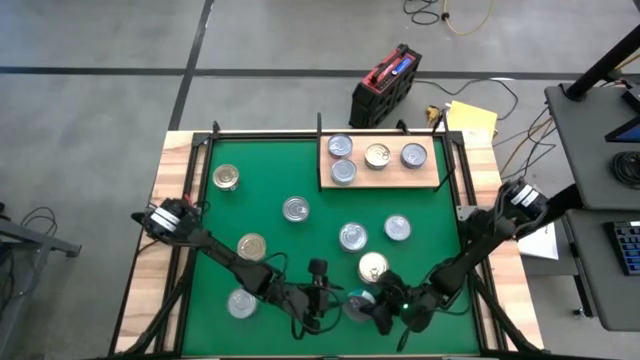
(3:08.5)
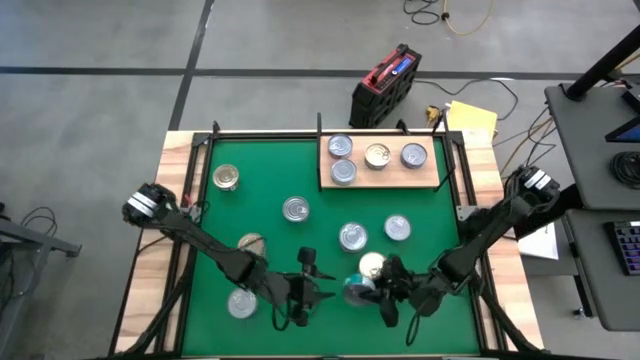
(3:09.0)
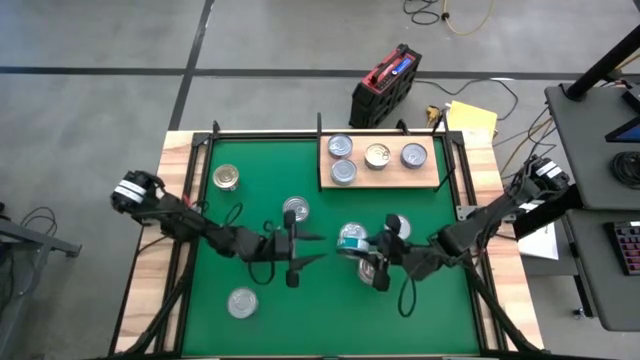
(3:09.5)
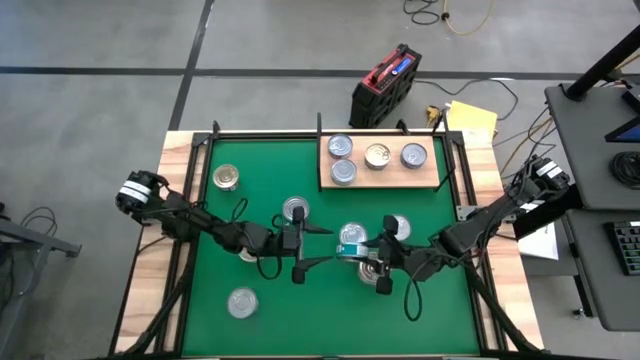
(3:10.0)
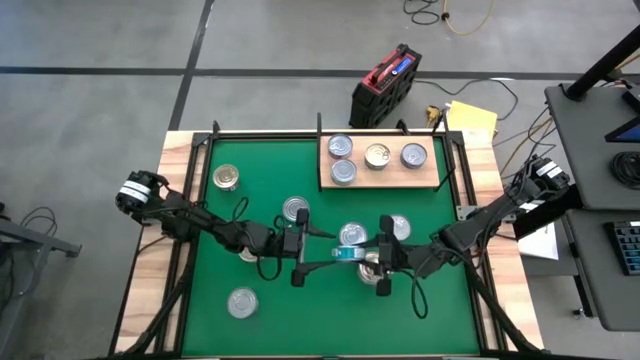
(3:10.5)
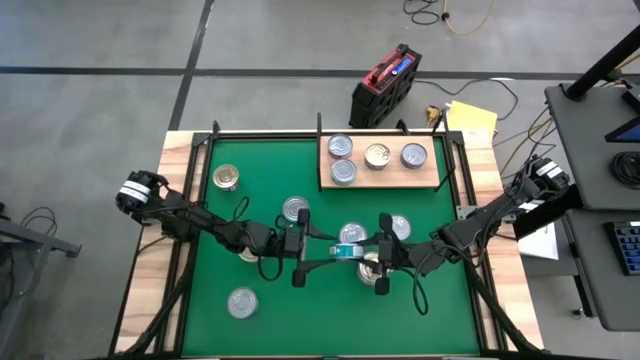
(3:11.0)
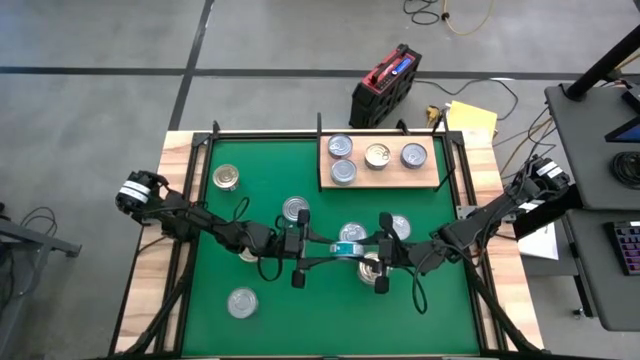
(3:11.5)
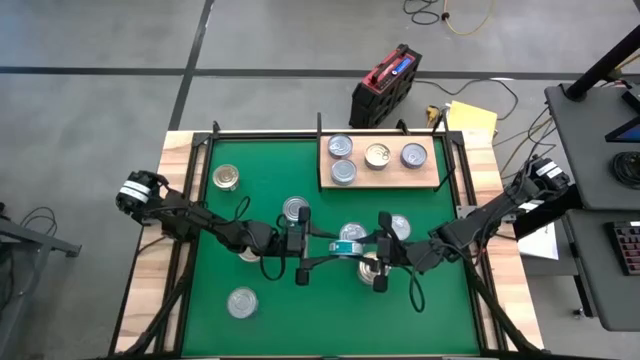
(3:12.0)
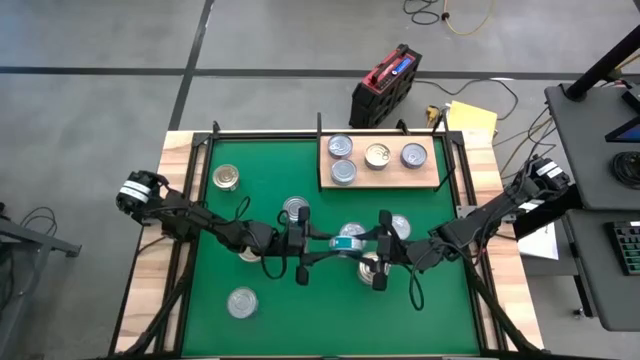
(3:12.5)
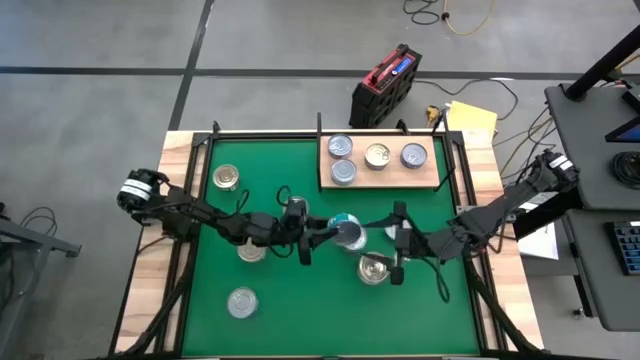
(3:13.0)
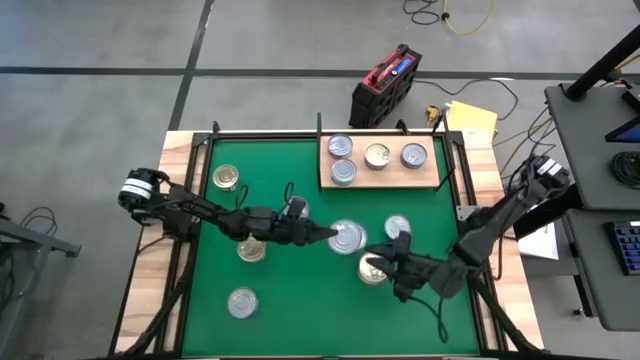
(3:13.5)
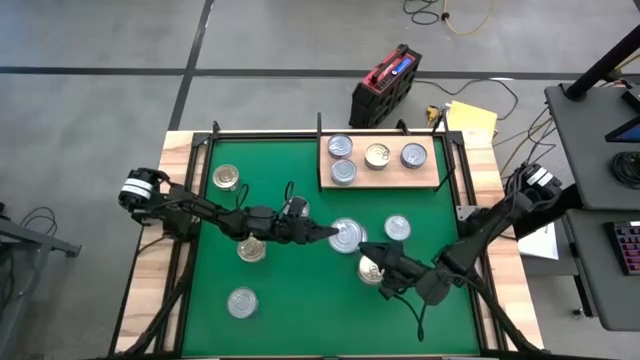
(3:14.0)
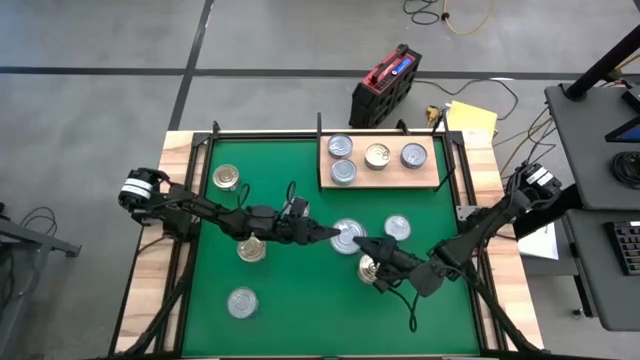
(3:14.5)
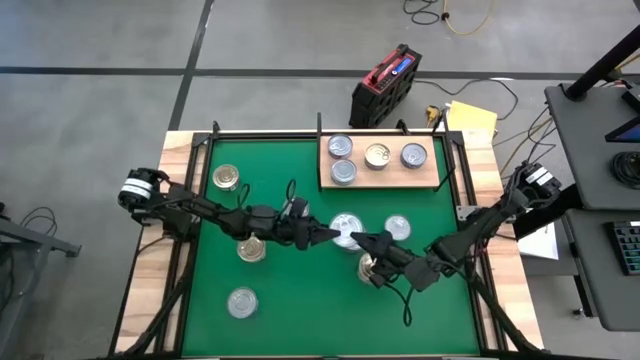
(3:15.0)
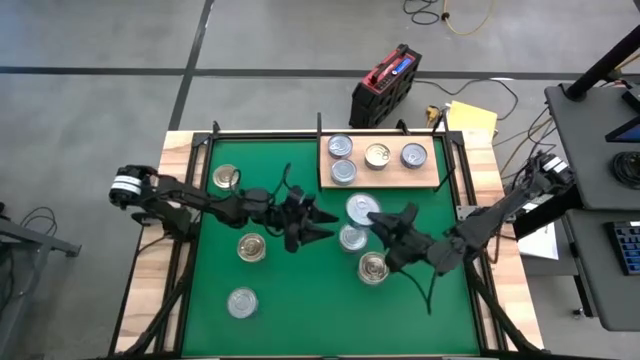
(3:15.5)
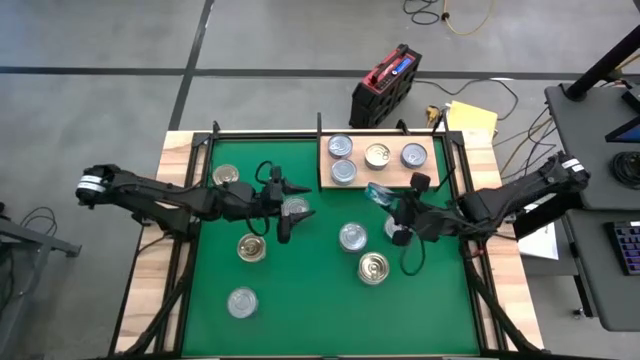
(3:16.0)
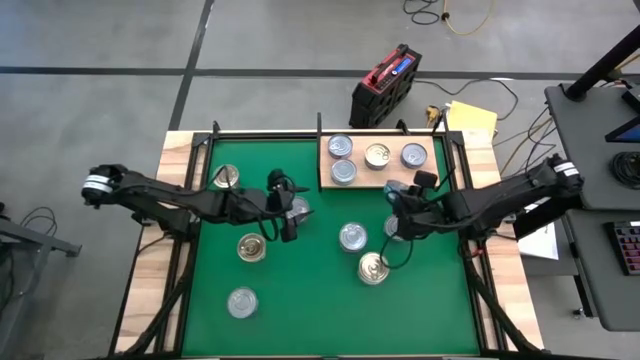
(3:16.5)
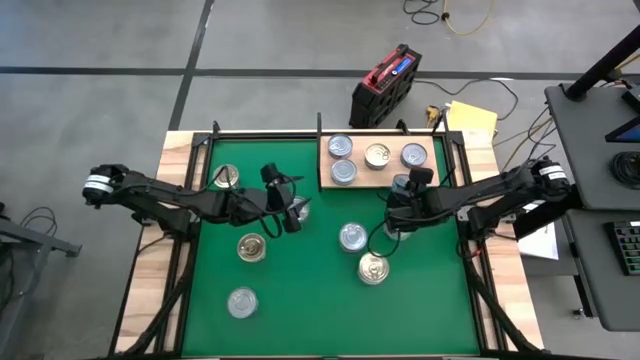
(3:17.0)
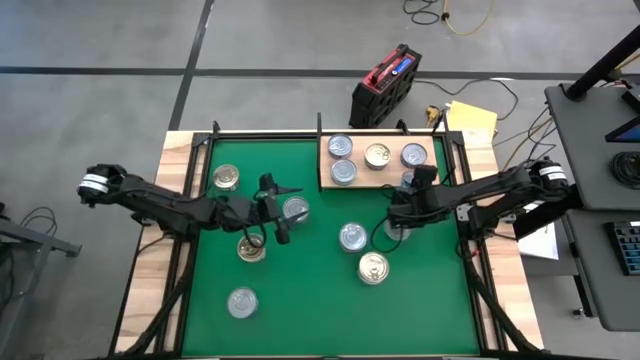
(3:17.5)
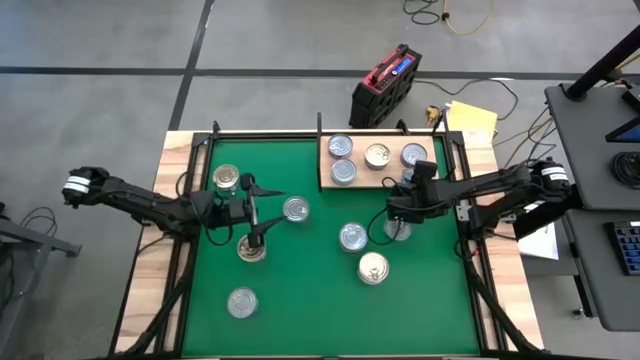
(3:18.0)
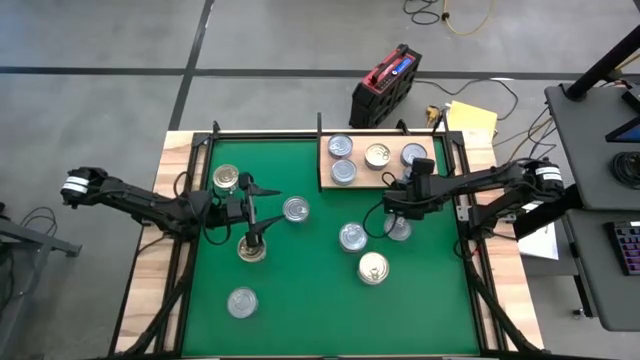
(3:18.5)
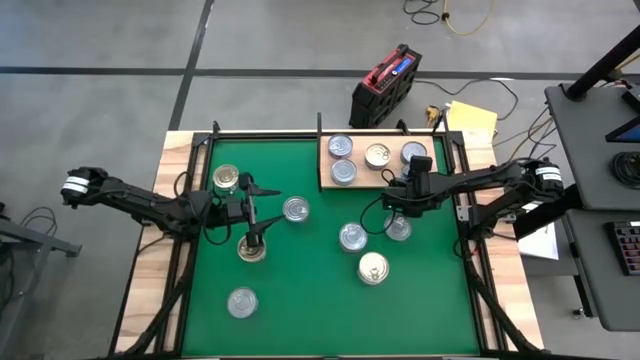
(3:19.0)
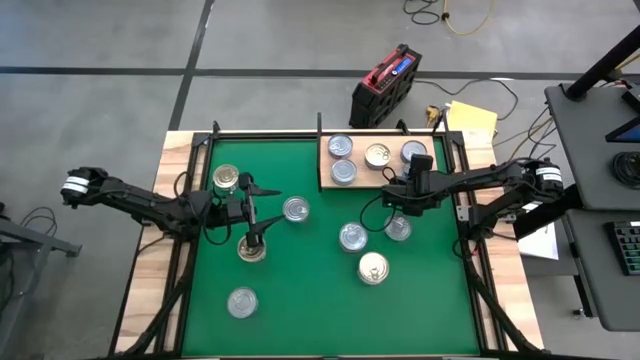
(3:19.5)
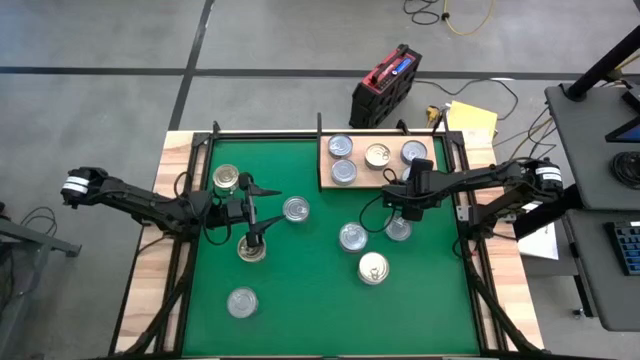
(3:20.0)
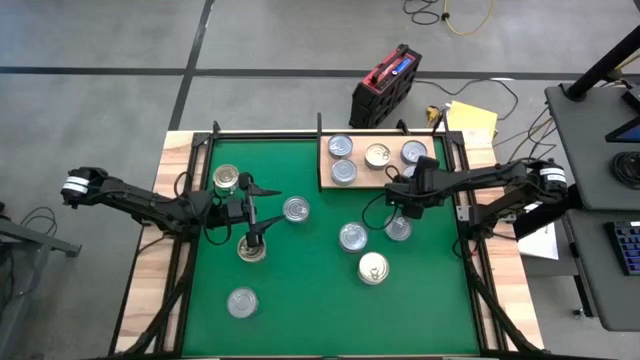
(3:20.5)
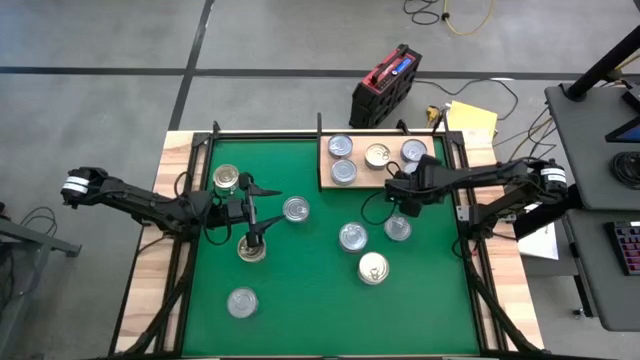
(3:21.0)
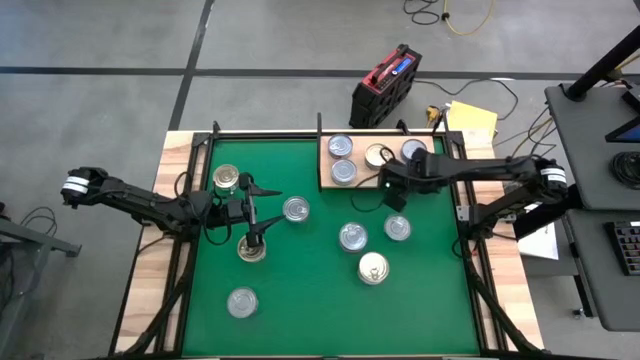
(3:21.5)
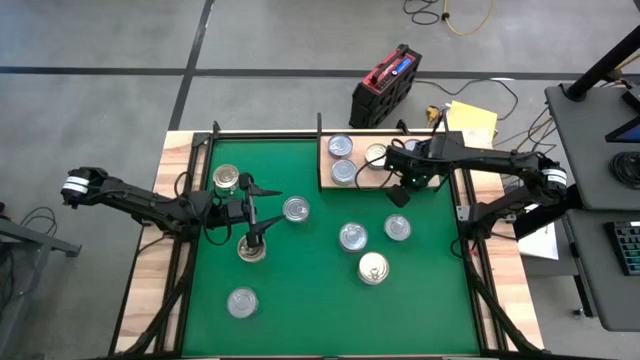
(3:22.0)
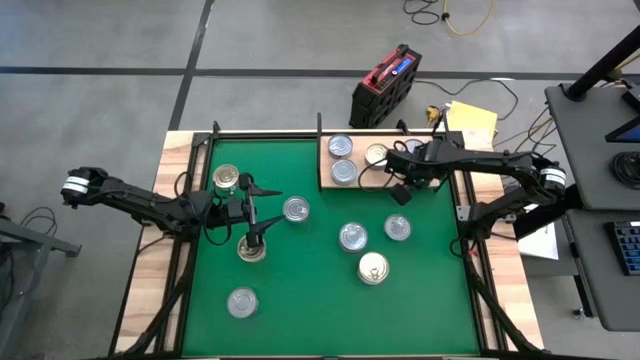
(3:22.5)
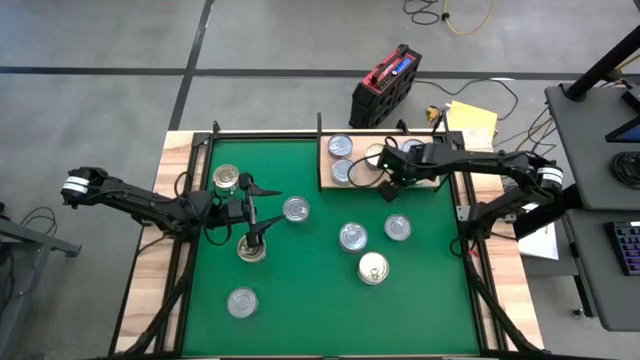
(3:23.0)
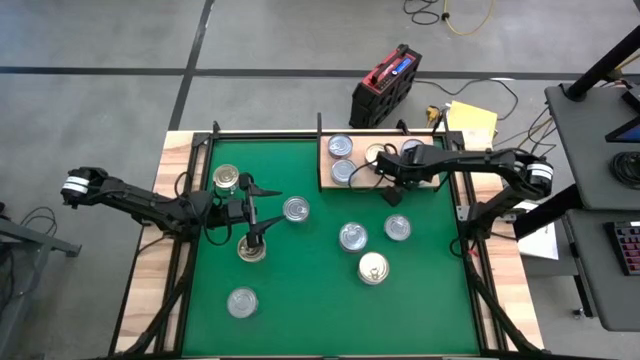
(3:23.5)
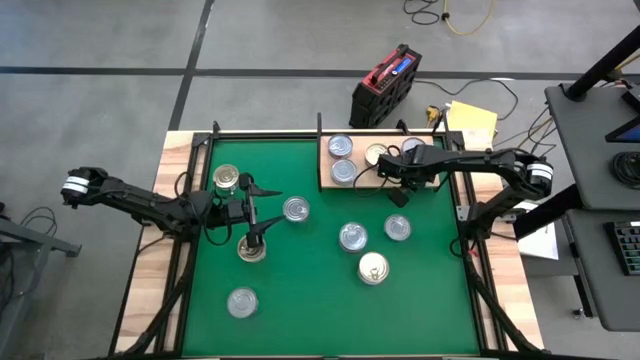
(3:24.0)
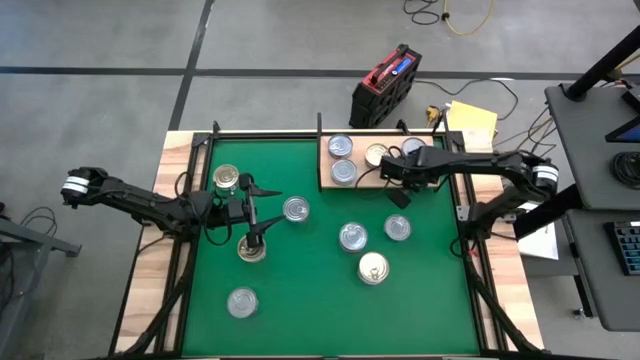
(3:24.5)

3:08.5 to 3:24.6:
Task: Stack canned seafood by type on shelf
Put the green/blue tuna can on the shelf

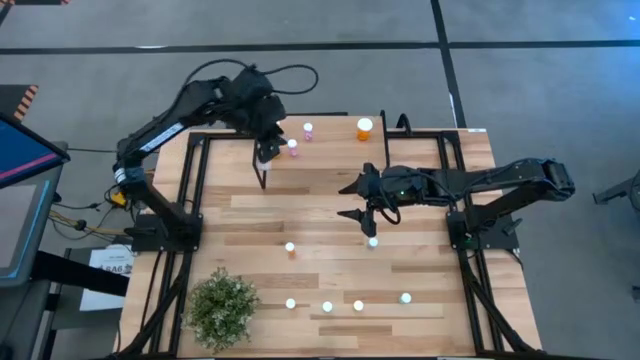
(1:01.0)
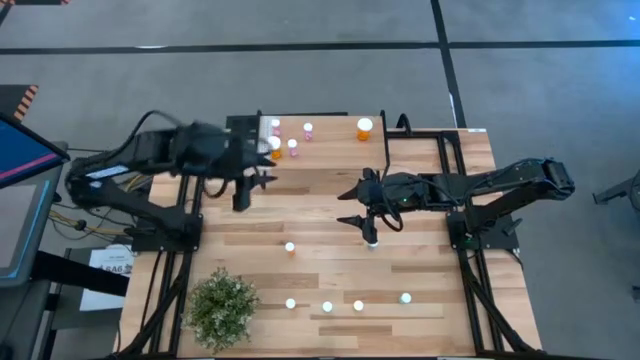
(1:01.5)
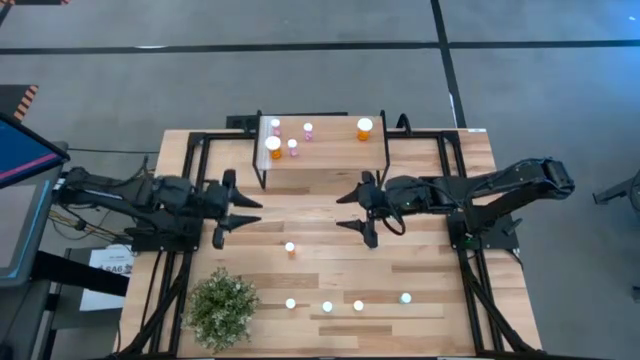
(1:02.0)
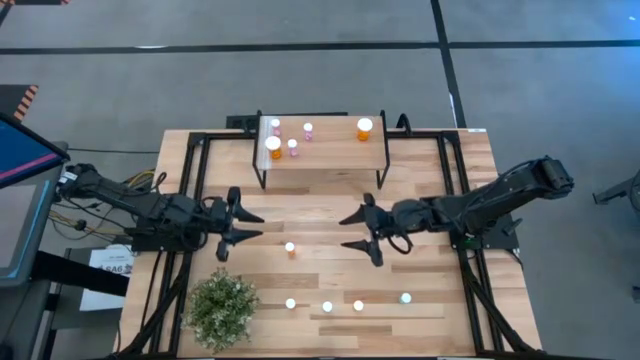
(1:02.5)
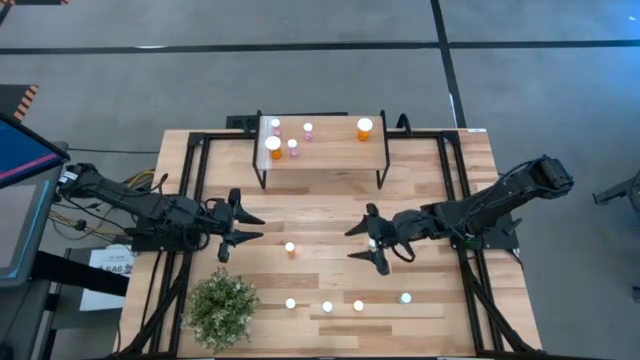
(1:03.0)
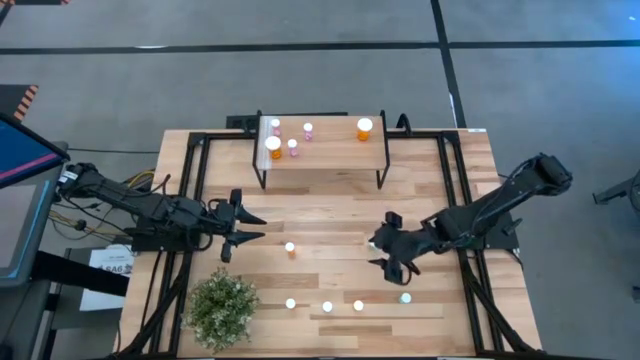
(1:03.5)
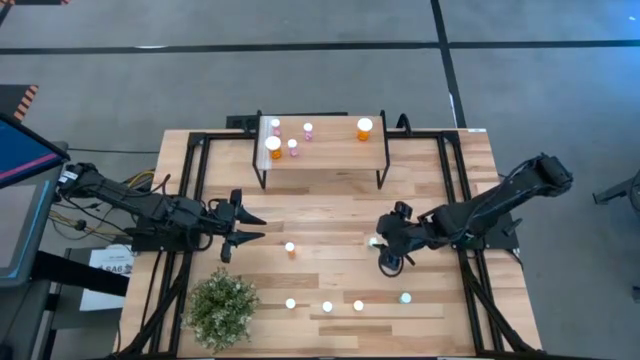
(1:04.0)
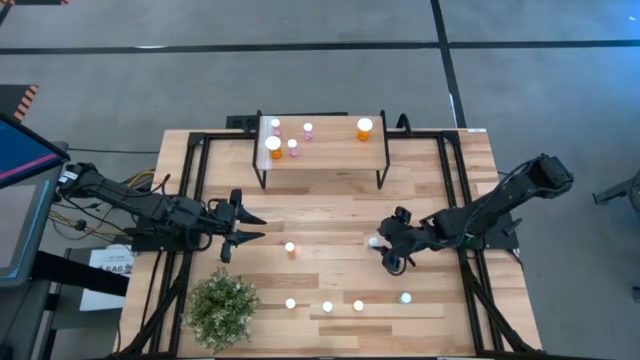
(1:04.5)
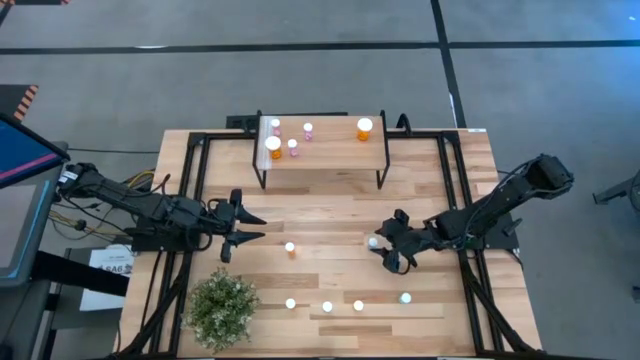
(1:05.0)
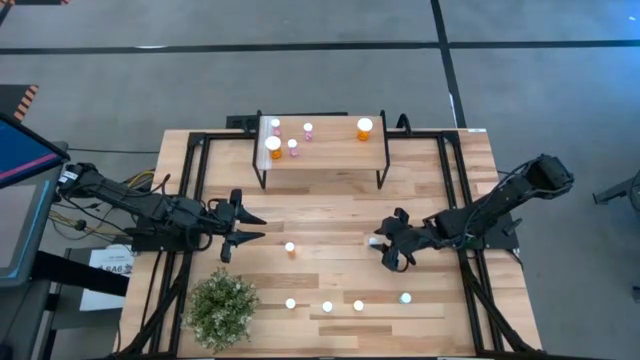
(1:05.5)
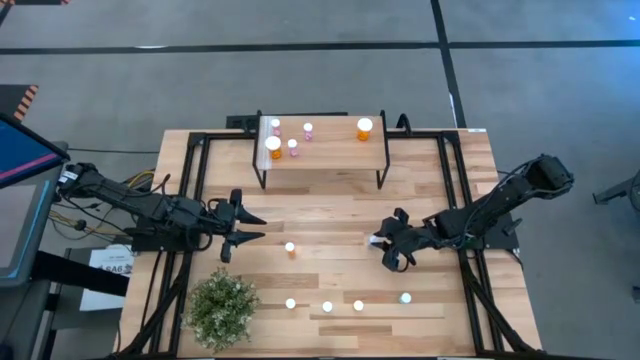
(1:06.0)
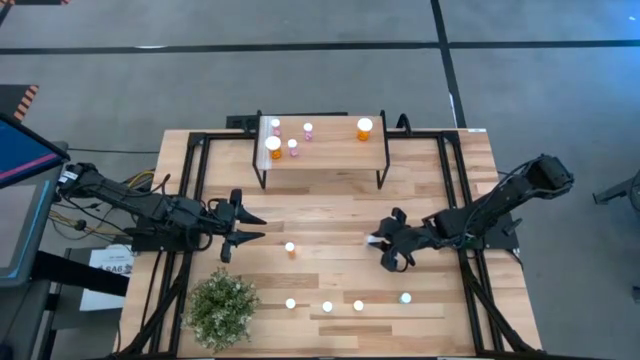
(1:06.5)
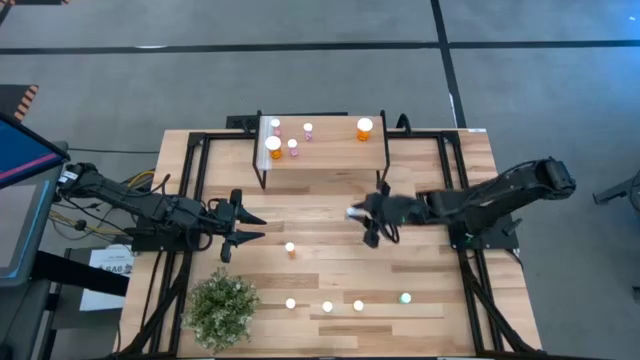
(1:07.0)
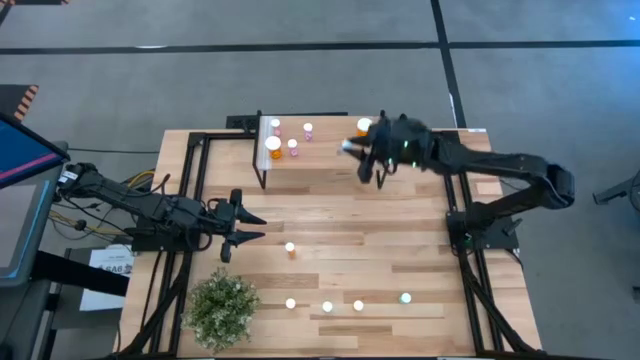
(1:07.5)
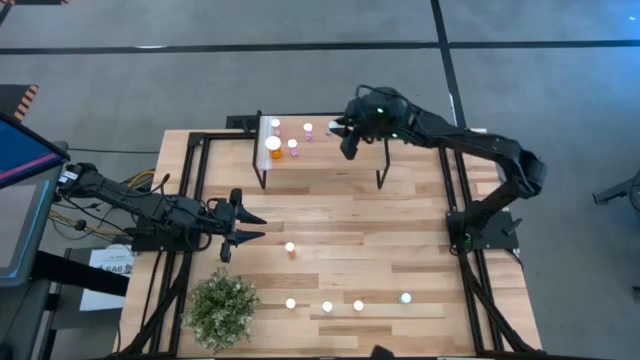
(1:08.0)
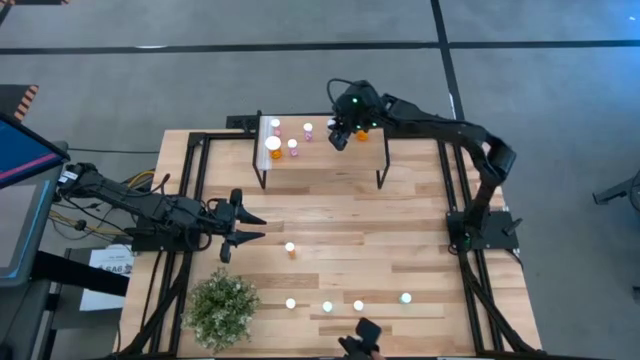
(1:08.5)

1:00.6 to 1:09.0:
Task: Pick and place medicine bottles onto shelf by color
Put the small green pill bottle on the shelf
